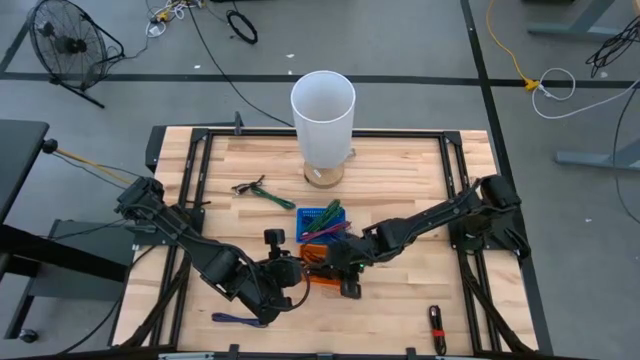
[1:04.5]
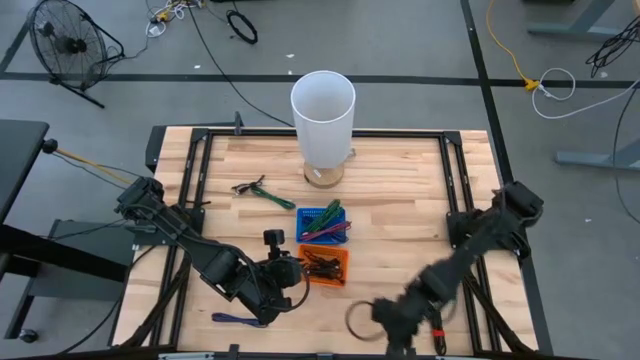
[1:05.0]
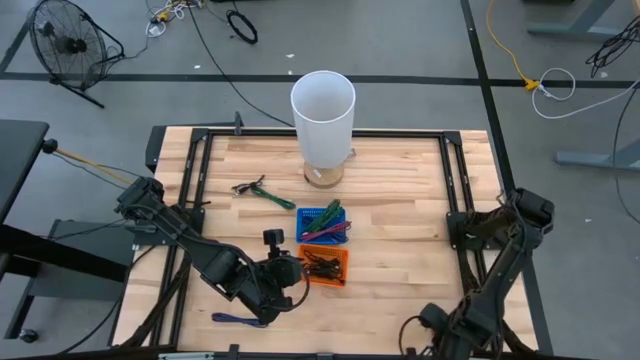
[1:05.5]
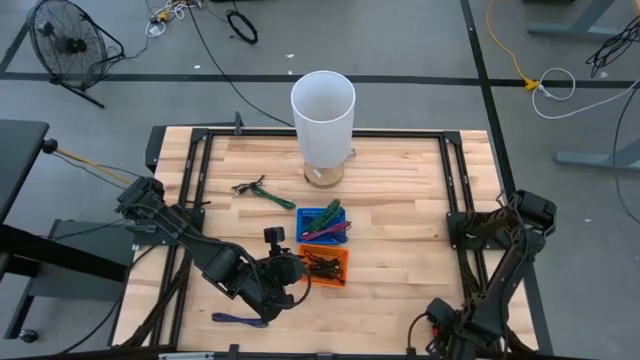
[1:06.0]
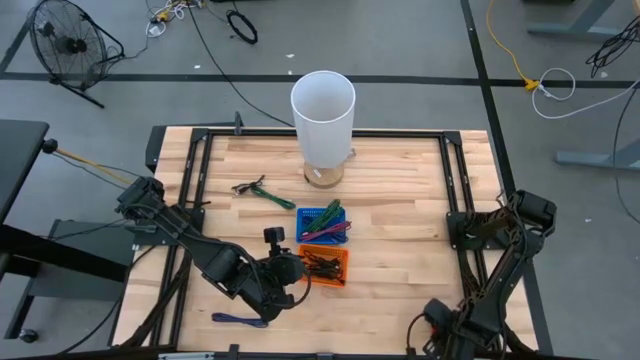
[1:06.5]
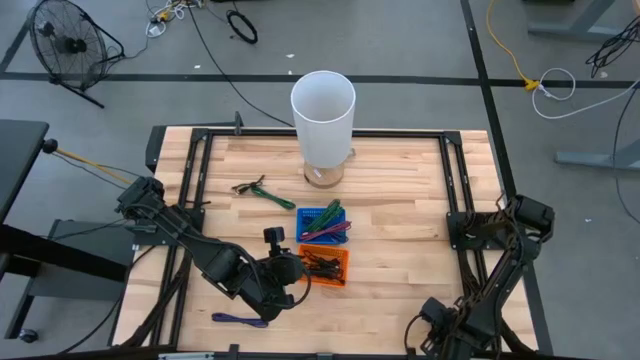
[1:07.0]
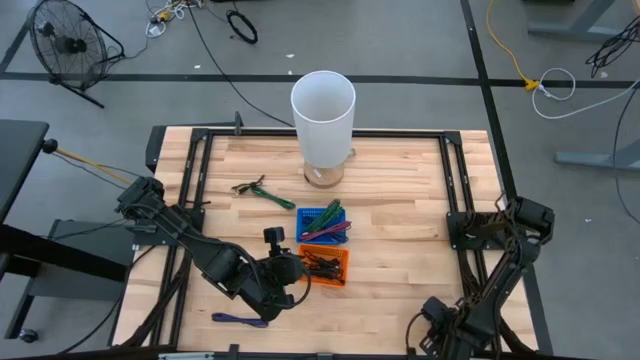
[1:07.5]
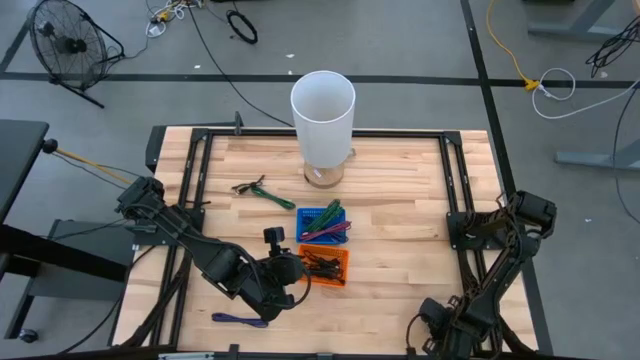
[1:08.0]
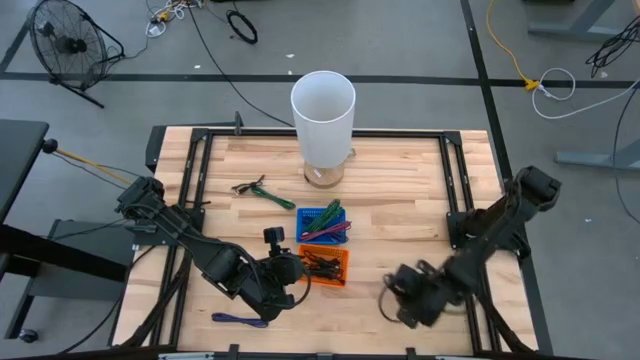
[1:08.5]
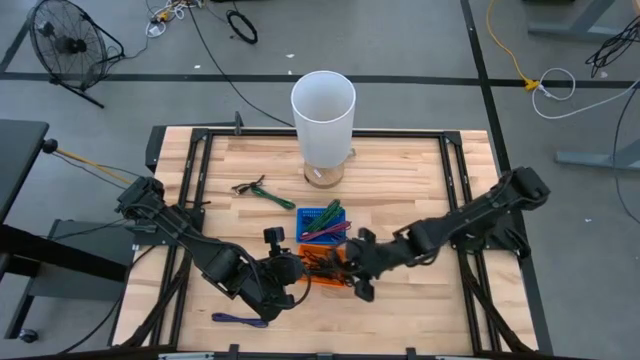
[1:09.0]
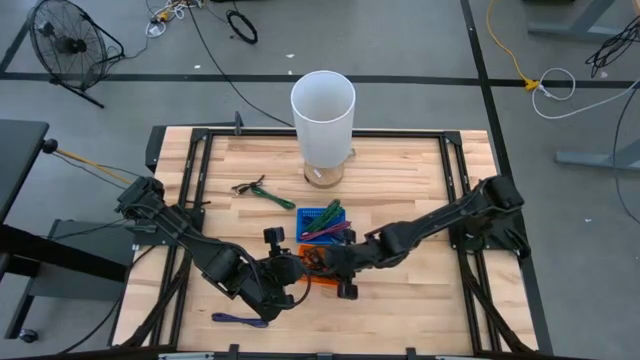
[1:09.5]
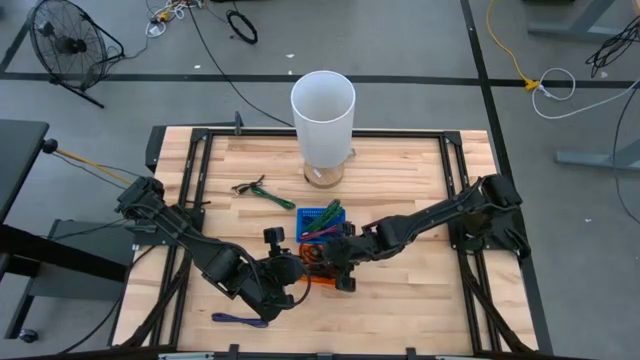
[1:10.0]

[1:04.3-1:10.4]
Task: Pick & Place USB Port
Put the black charger cable into the orange bin

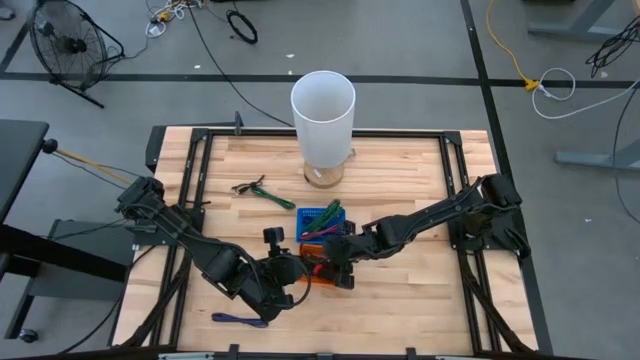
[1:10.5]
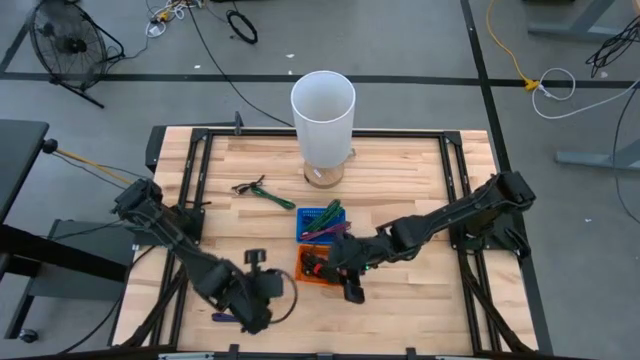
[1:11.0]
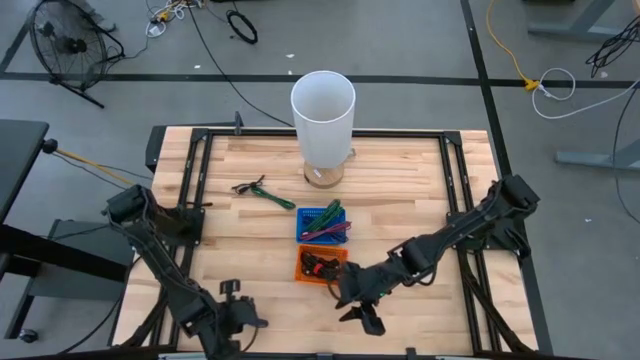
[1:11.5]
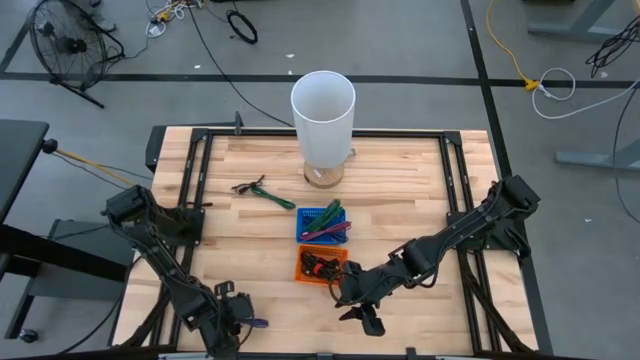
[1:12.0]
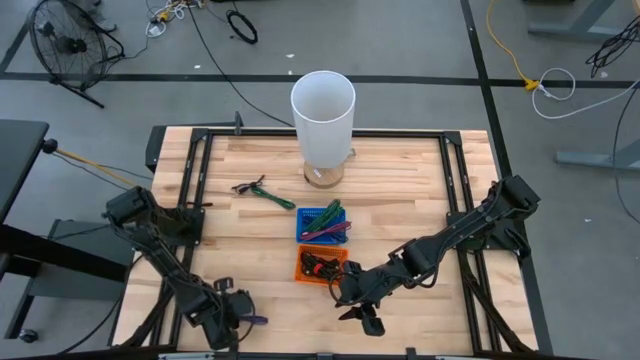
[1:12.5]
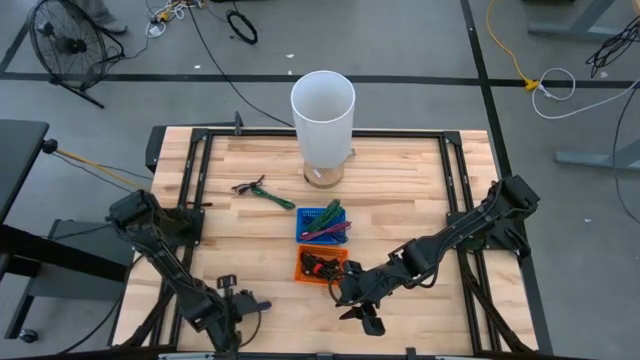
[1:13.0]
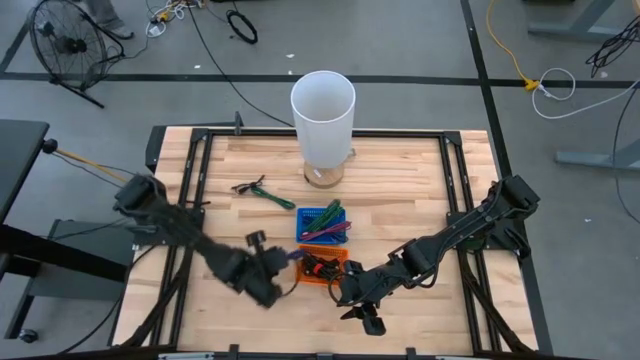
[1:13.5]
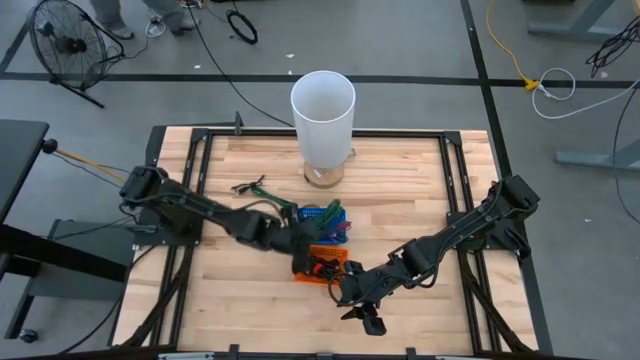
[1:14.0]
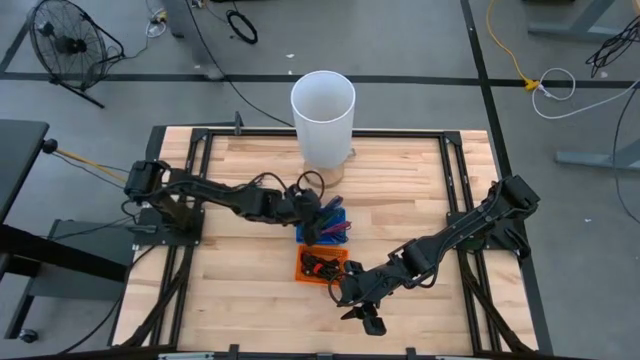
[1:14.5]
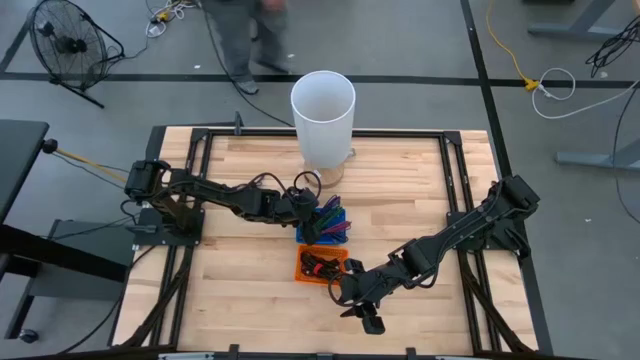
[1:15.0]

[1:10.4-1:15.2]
Put the blue charger cable into the blue bin

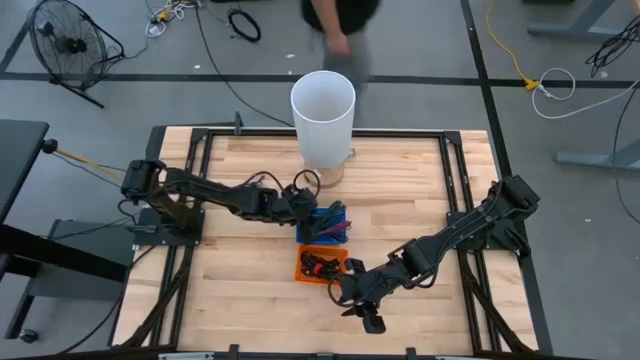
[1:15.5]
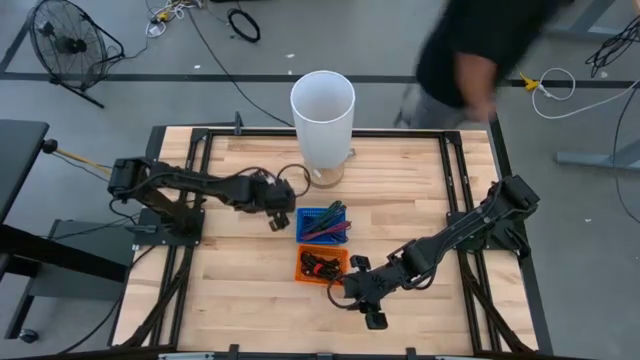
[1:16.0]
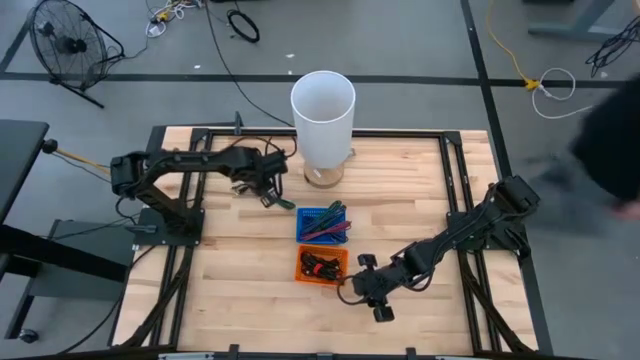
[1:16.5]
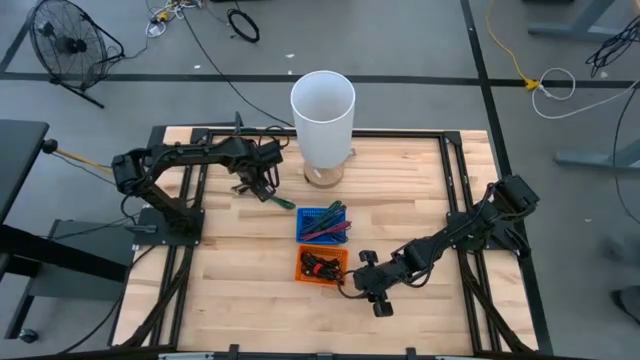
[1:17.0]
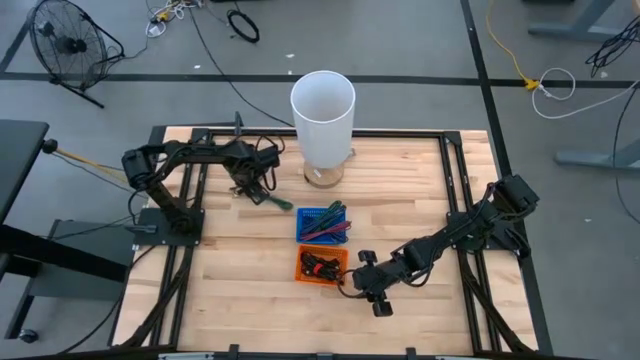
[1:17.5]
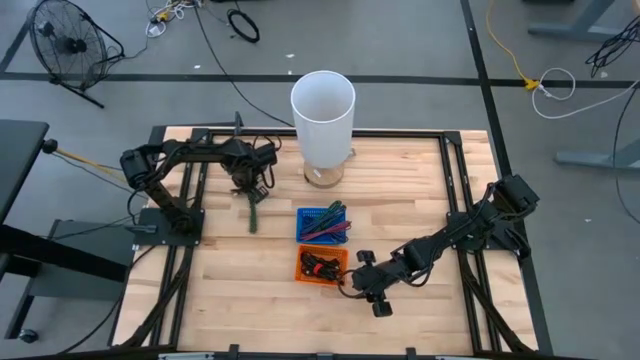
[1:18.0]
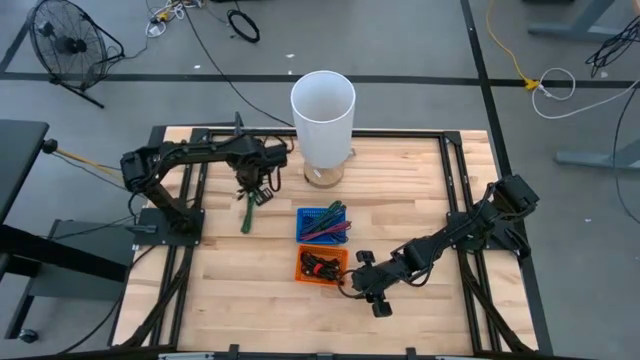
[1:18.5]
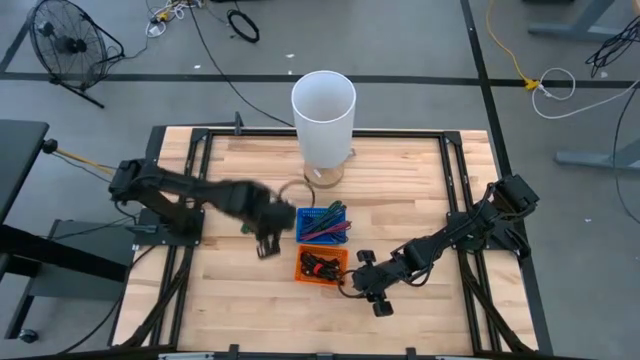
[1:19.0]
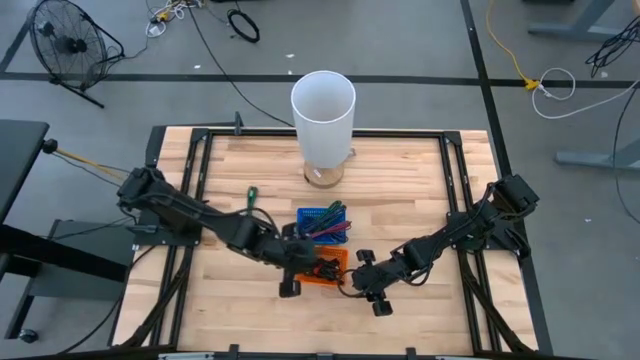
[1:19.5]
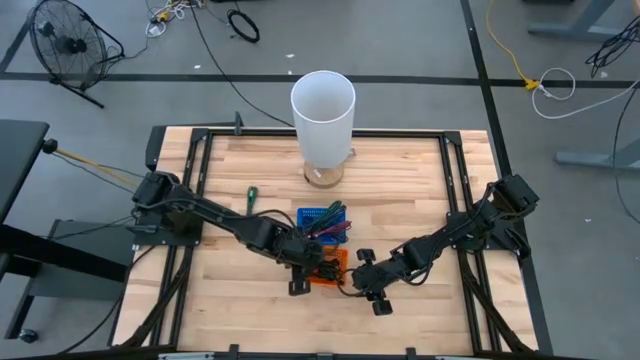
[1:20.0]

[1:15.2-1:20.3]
Put the black charger cable into the orange bin

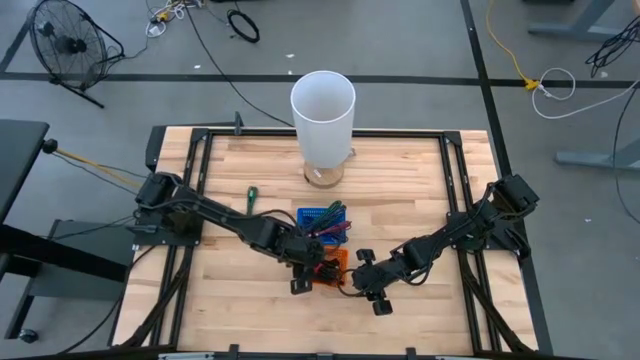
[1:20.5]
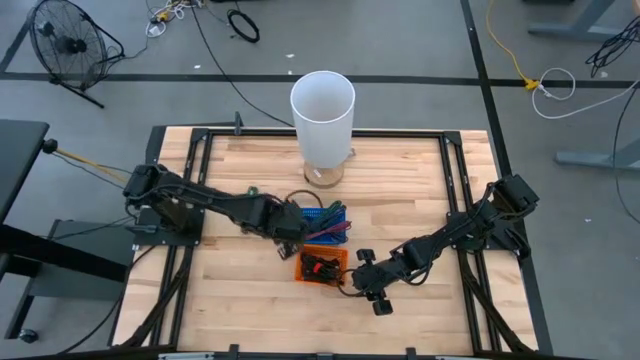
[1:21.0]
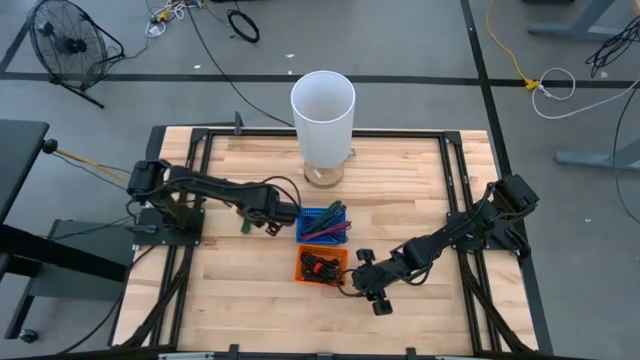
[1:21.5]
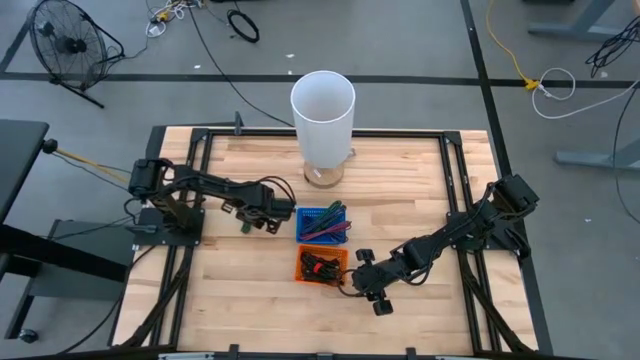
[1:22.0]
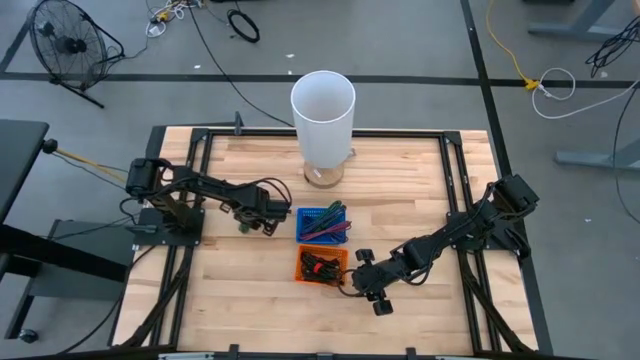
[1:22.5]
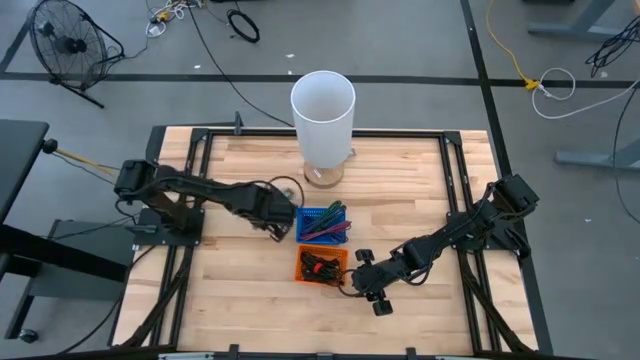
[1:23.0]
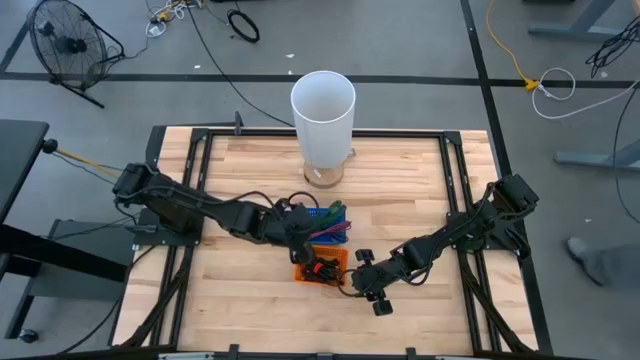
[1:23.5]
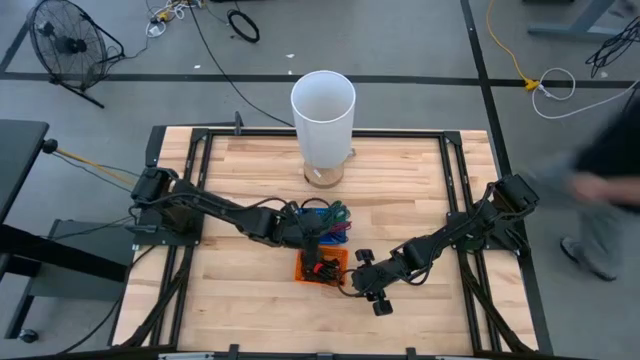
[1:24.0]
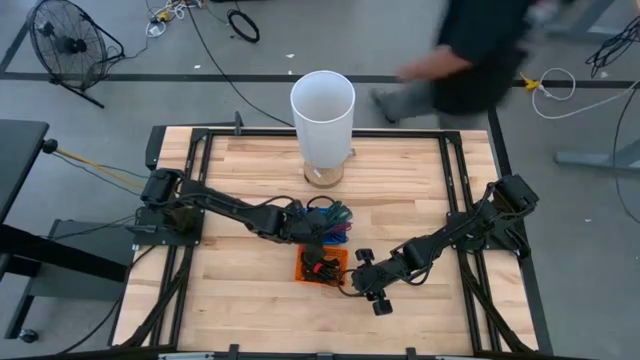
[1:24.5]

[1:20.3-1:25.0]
Put the green charger cable into the blue bin
